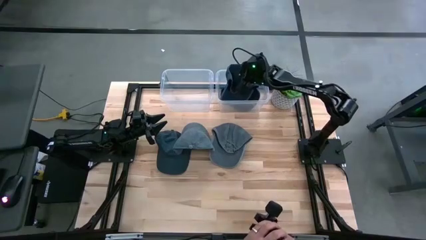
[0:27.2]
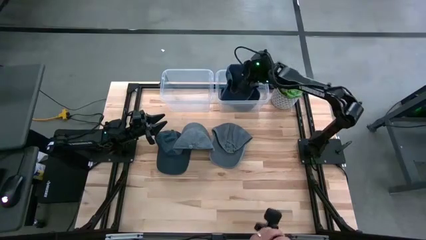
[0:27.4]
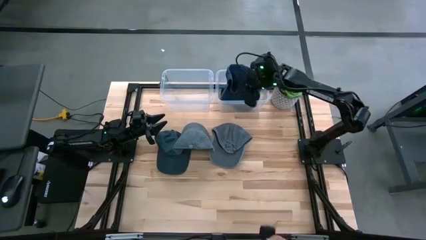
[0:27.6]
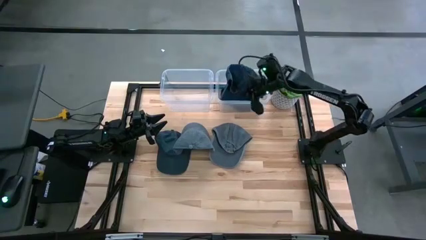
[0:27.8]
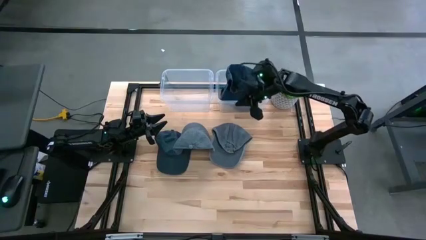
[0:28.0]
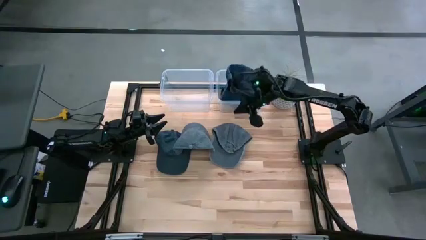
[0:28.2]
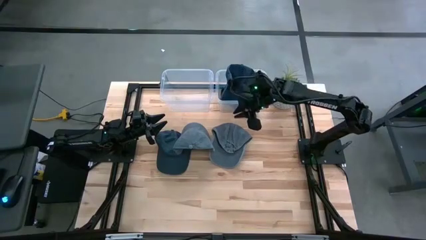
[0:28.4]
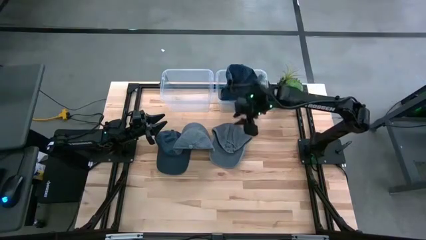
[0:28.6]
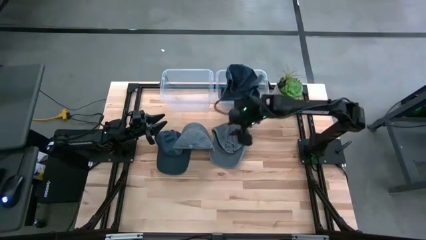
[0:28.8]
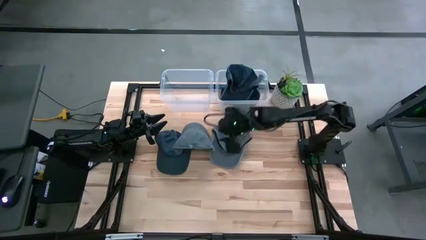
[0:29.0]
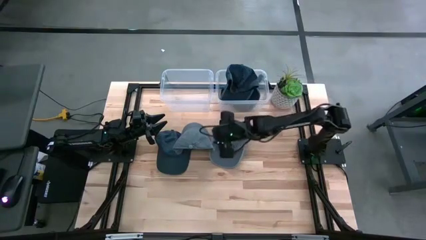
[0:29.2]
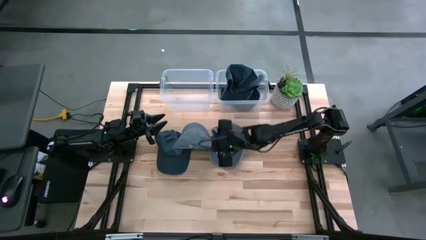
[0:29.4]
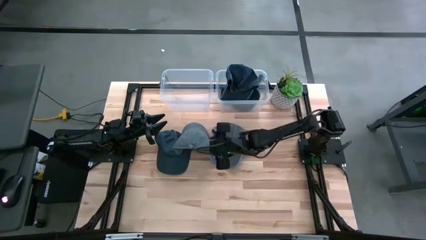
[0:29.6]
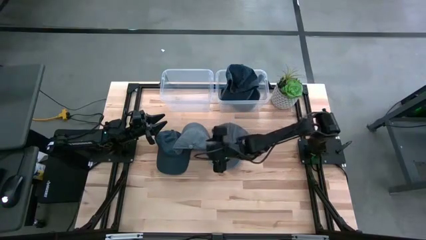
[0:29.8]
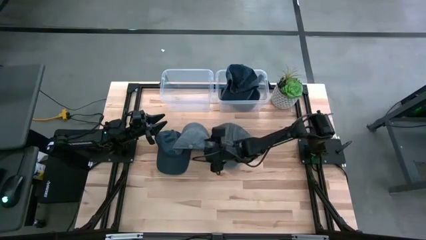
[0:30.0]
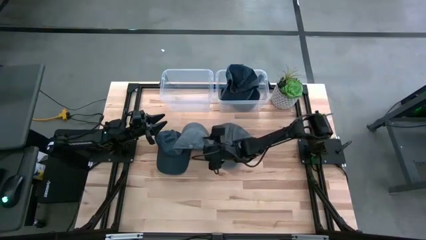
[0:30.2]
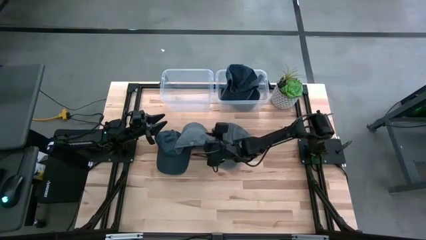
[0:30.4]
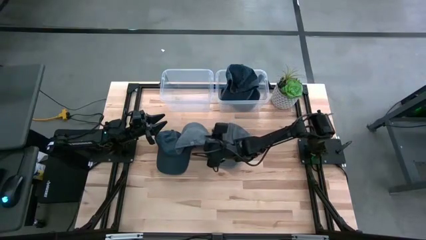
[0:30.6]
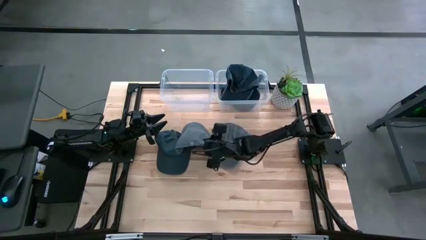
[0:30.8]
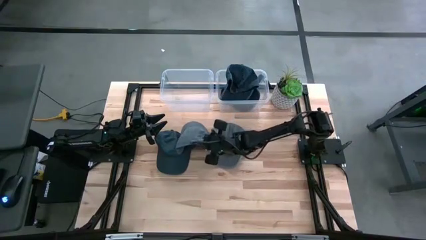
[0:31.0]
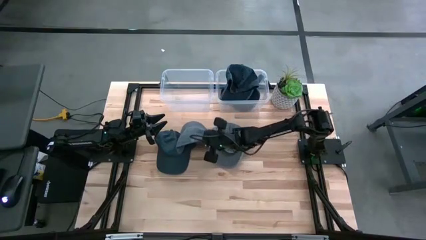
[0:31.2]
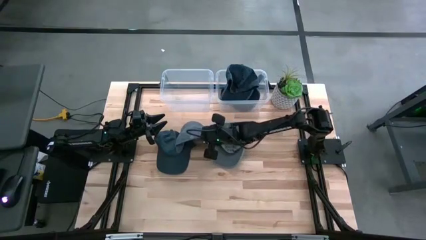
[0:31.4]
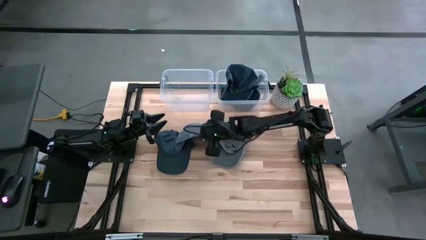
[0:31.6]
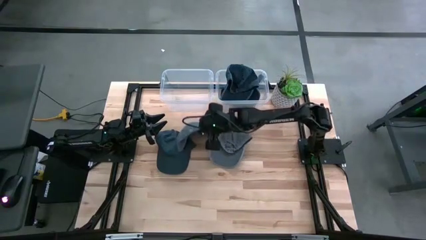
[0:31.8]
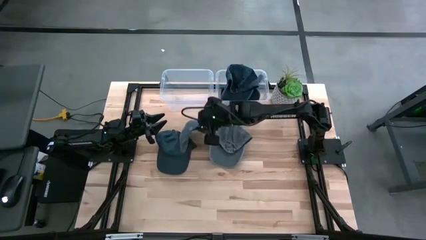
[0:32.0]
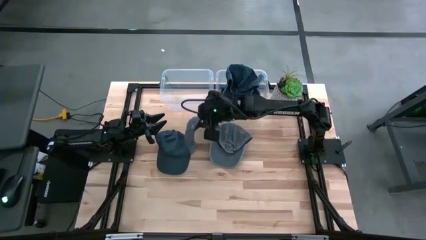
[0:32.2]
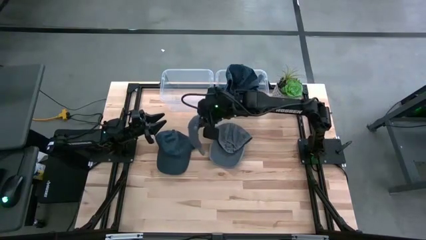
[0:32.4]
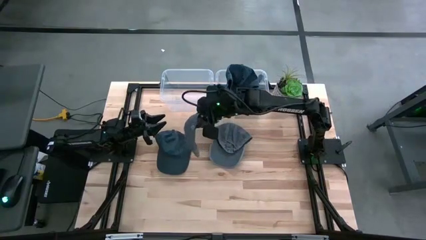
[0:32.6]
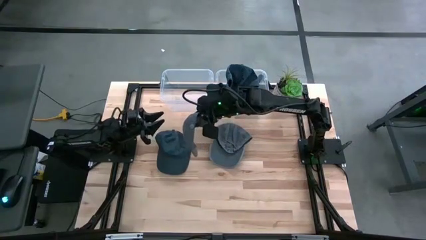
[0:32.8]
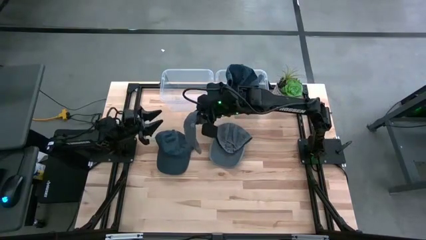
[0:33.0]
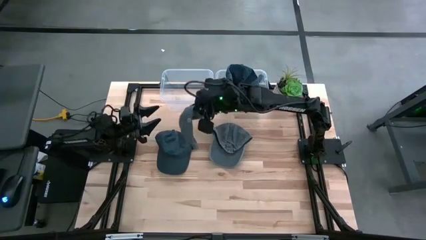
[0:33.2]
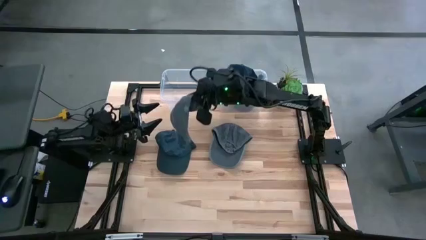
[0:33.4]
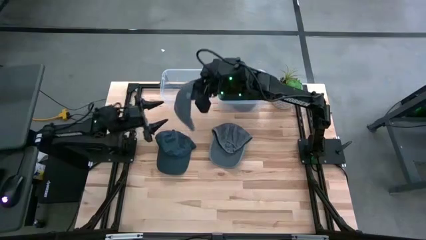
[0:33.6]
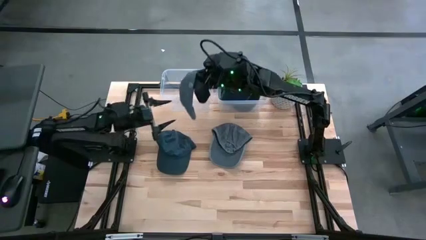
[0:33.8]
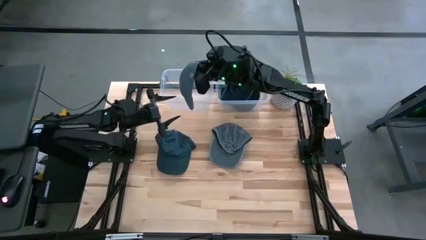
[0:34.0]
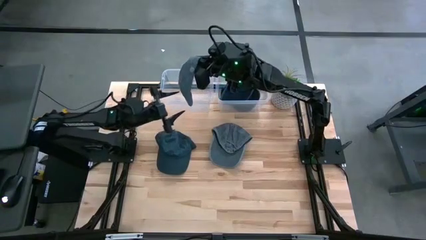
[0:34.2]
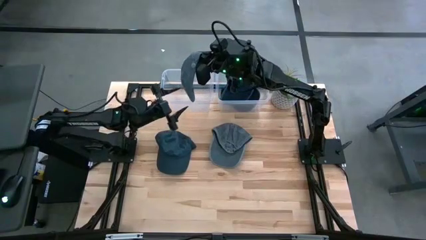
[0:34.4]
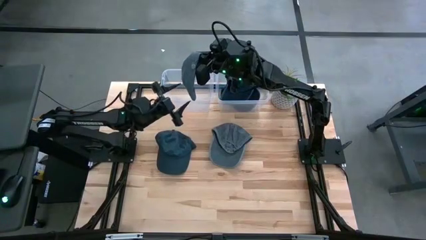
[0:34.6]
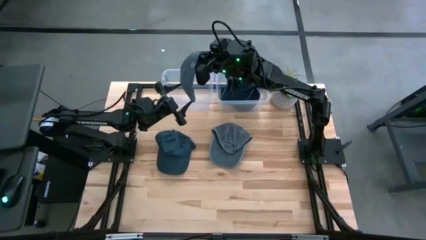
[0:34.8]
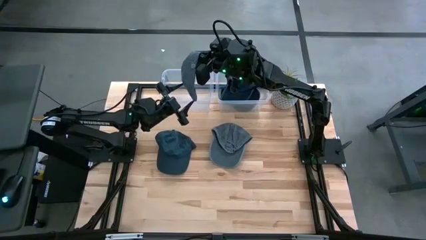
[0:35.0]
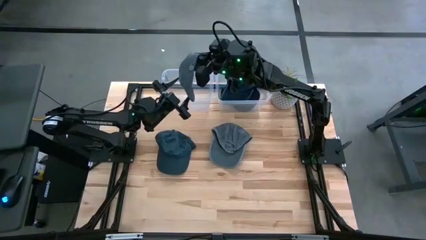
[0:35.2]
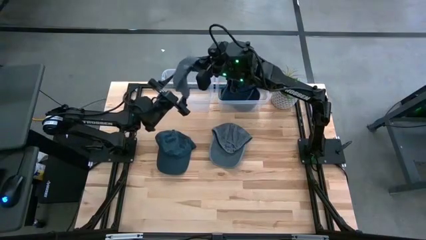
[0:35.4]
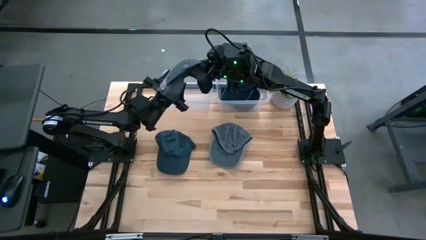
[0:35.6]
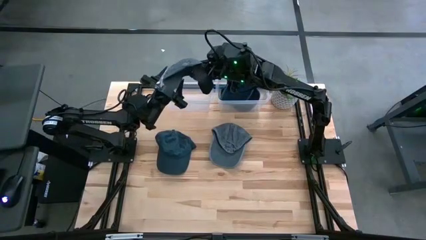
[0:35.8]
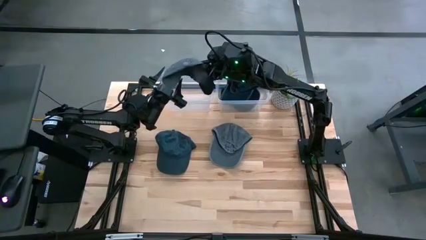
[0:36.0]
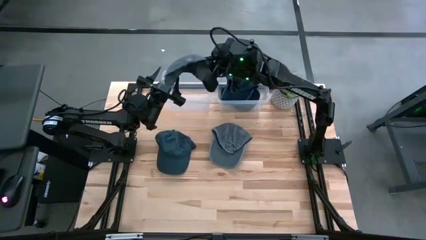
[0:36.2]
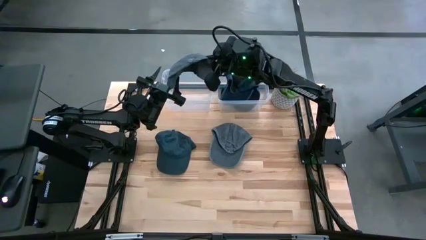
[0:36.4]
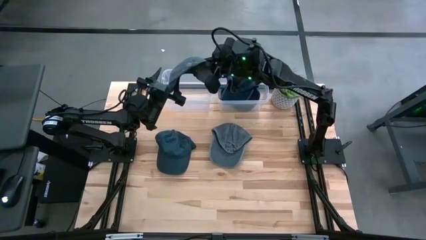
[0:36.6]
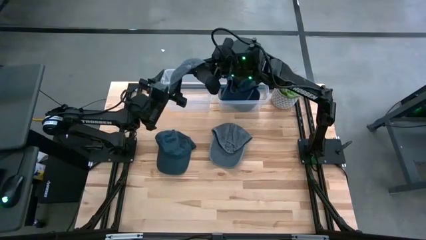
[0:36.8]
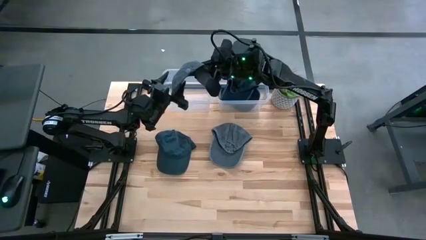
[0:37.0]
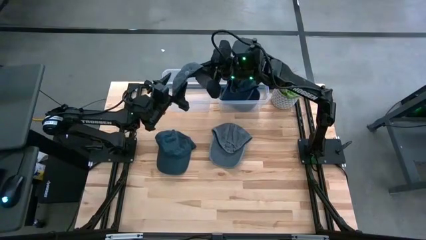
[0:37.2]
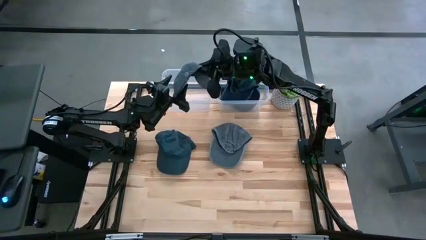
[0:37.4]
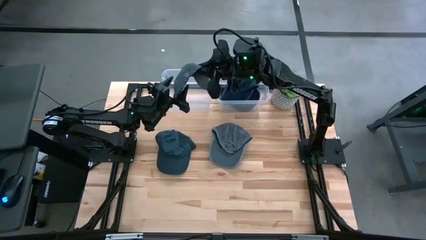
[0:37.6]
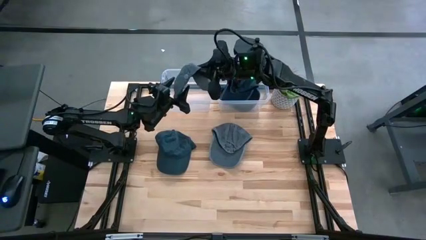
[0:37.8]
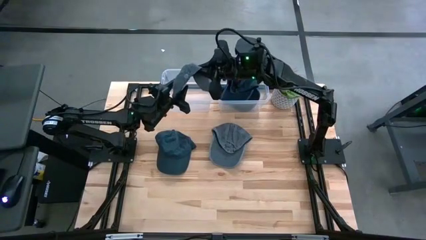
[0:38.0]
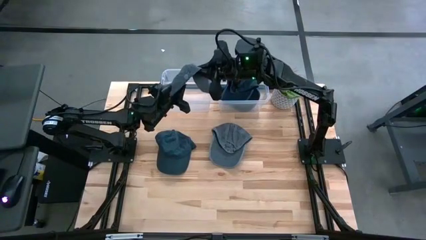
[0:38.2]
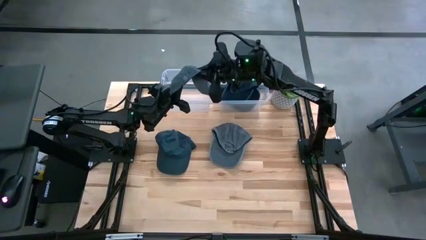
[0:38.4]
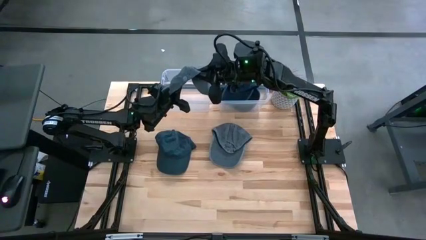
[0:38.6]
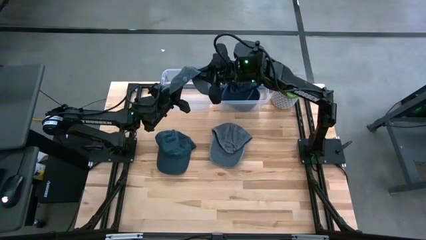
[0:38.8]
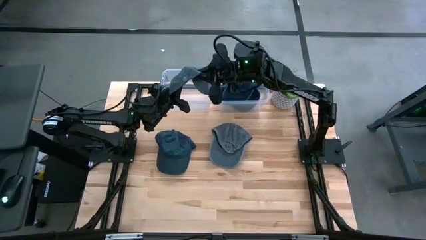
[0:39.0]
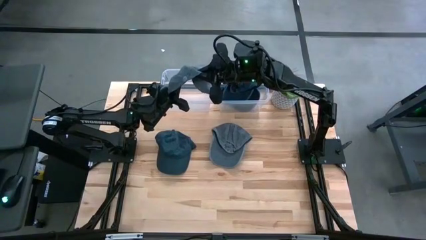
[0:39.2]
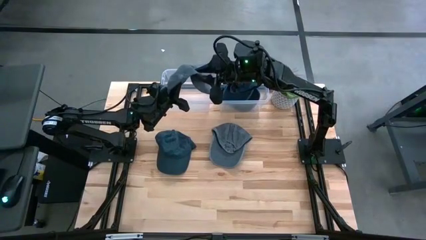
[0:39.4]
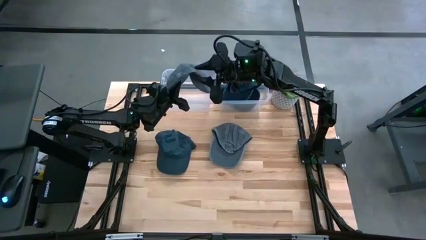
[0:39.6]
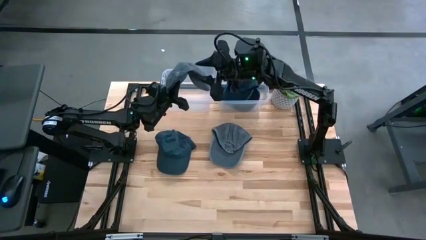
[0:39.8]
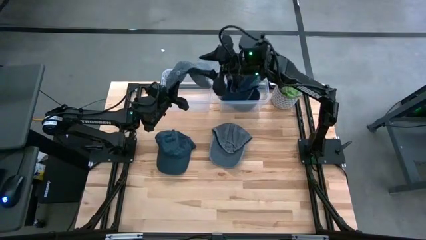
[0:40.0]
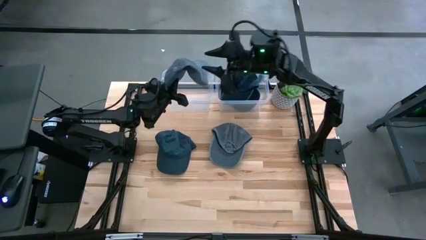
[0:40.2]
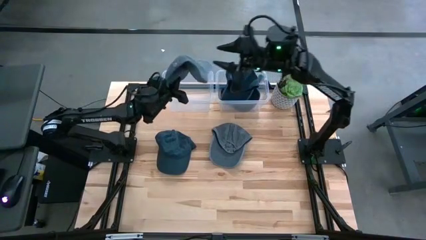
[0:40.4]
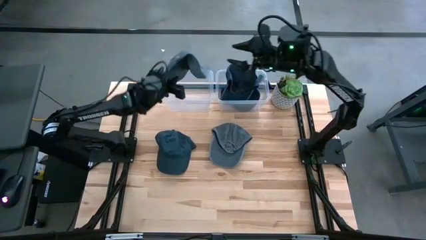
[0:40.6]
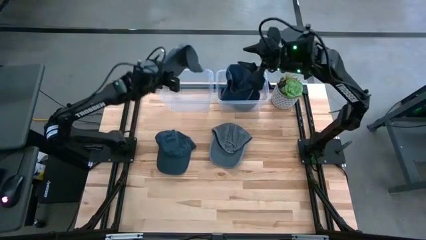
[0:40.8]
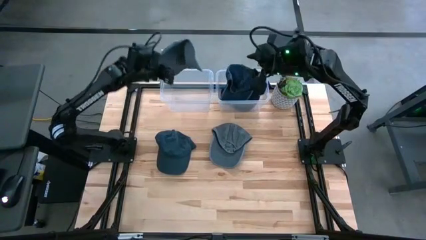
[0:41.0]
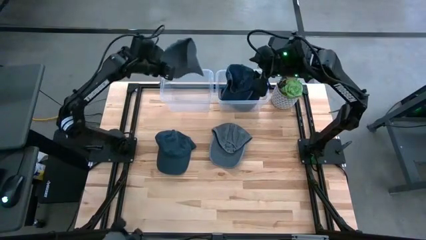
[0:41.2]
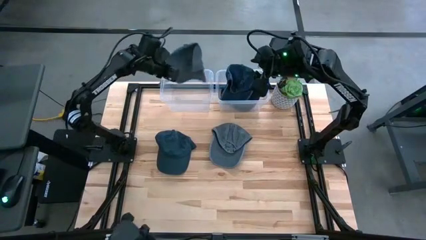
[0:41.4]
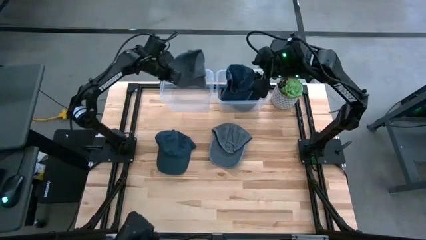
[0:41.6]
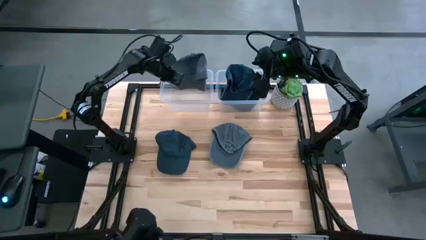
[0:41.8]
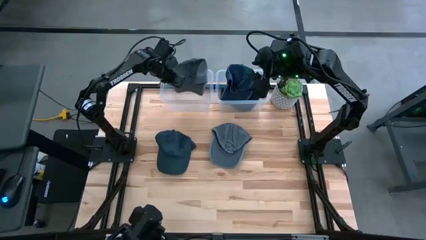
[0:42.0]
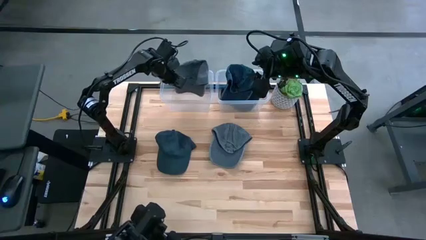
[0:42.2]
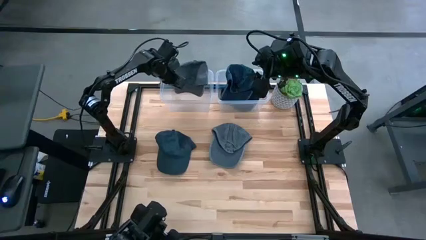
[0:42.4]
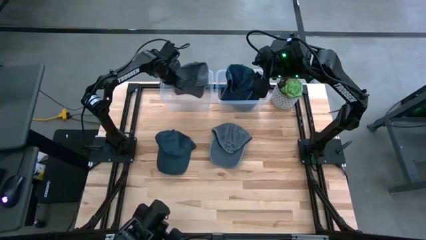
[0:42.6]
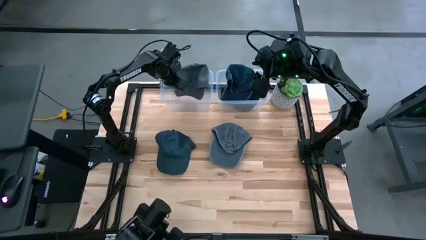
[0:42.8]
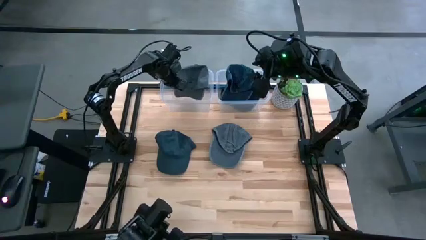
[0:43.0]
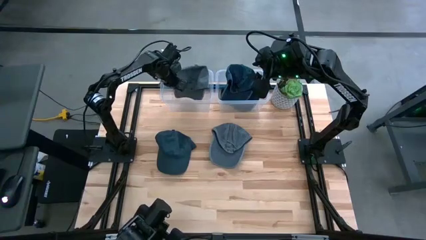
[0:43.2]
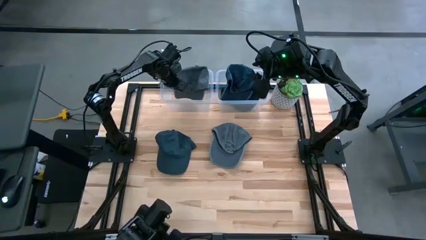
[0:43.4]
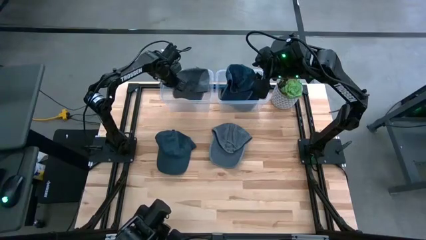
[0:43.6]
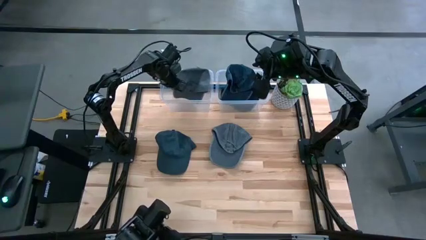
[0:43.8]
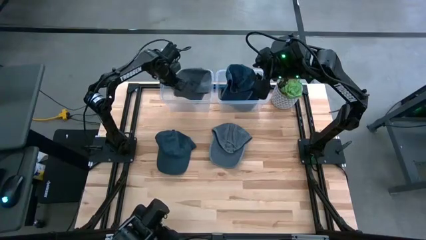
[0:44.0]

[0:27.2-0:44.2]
Task: Pick & Place hat
Put the left gray cap into the left transparent bin
